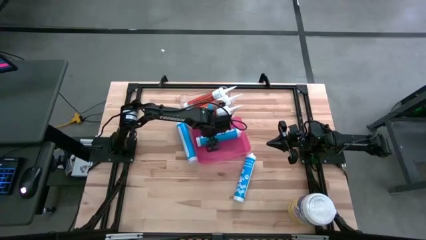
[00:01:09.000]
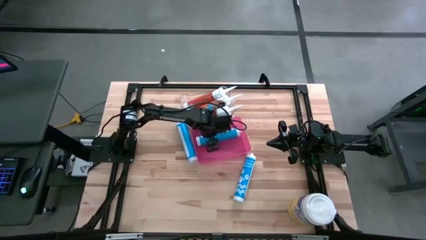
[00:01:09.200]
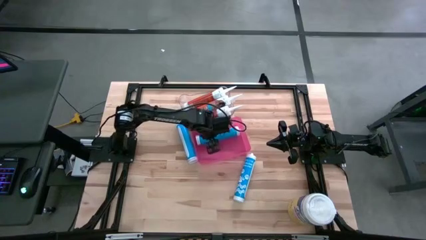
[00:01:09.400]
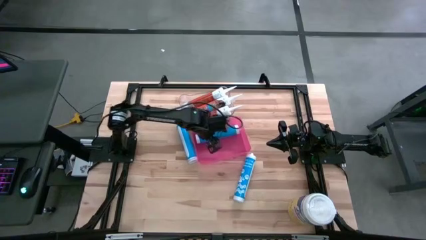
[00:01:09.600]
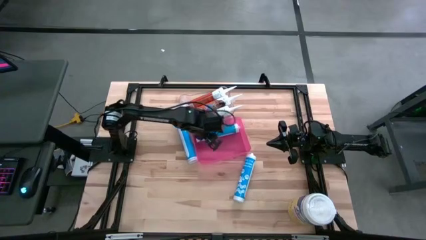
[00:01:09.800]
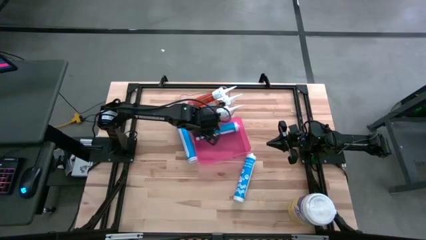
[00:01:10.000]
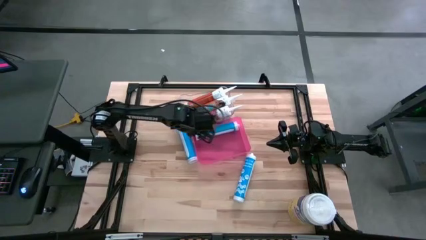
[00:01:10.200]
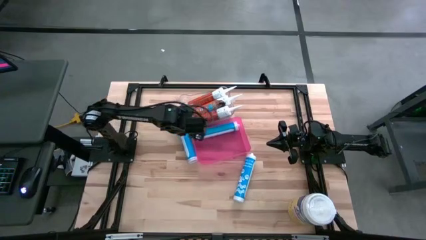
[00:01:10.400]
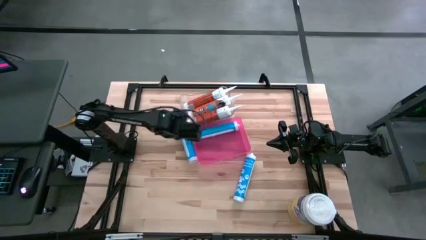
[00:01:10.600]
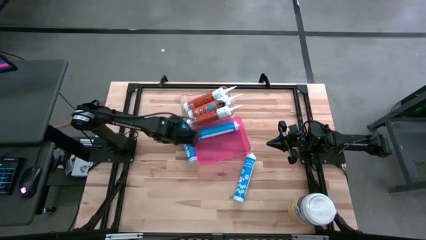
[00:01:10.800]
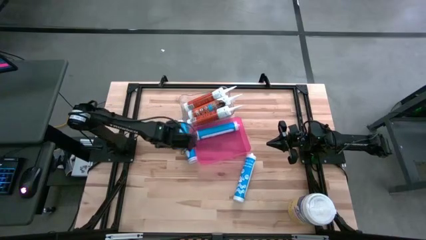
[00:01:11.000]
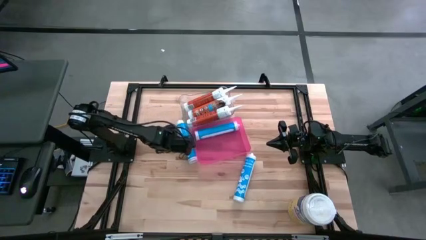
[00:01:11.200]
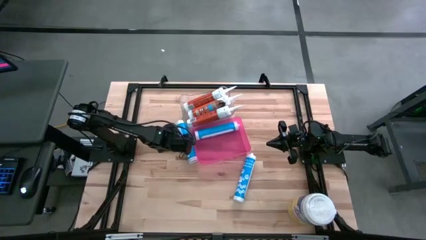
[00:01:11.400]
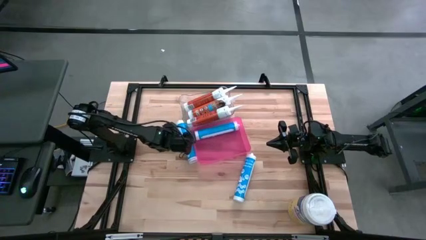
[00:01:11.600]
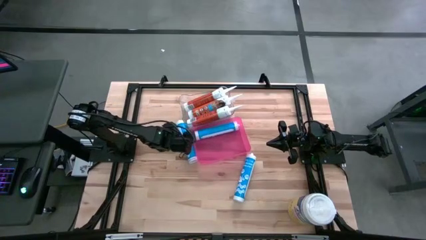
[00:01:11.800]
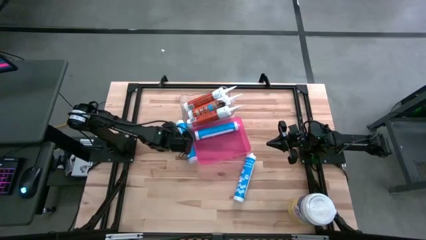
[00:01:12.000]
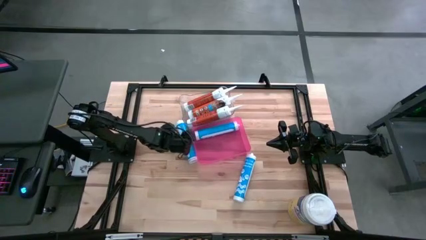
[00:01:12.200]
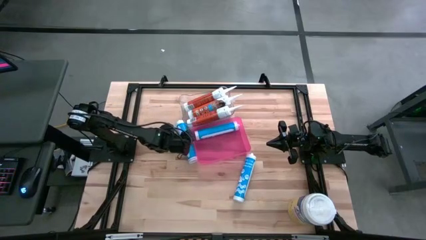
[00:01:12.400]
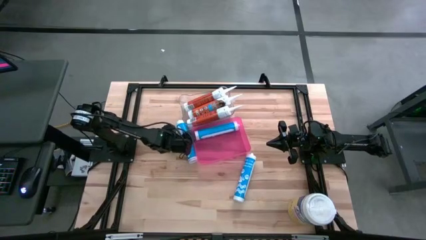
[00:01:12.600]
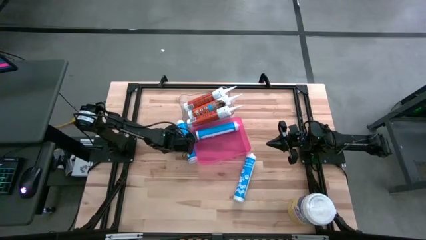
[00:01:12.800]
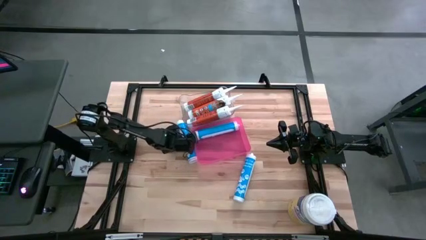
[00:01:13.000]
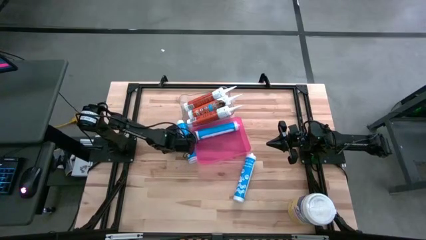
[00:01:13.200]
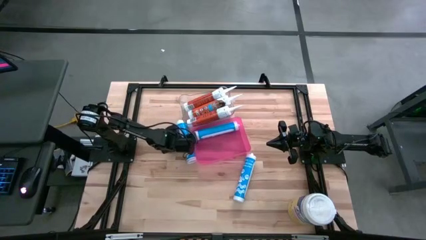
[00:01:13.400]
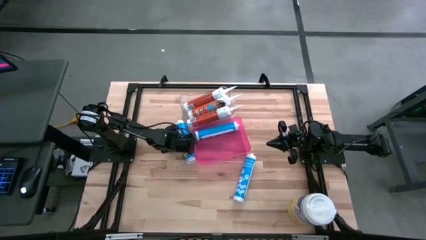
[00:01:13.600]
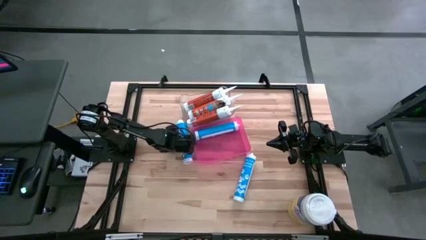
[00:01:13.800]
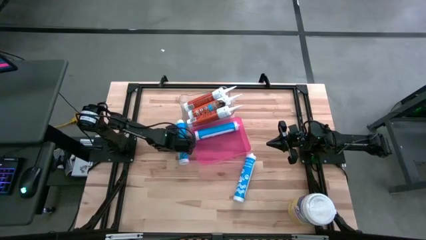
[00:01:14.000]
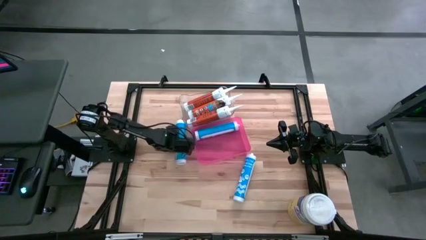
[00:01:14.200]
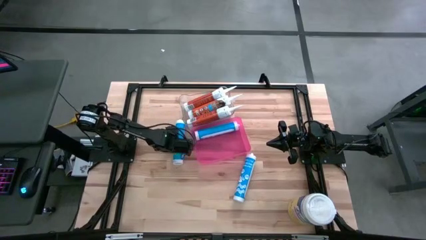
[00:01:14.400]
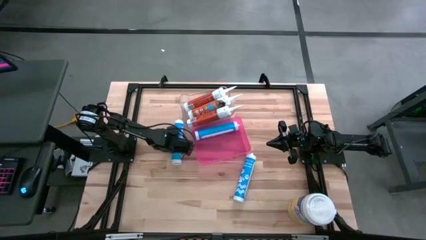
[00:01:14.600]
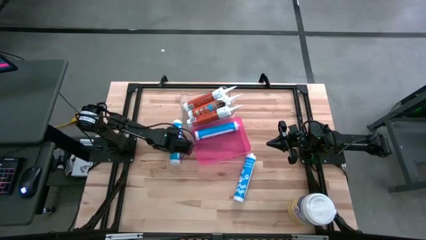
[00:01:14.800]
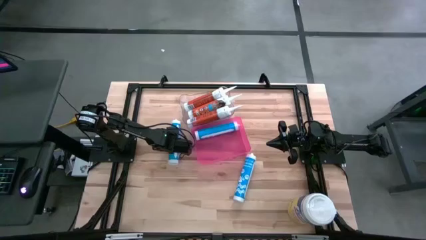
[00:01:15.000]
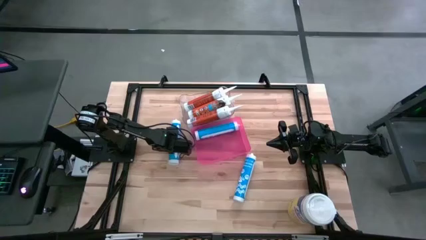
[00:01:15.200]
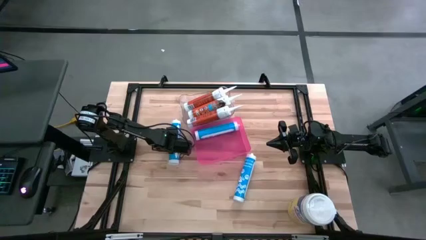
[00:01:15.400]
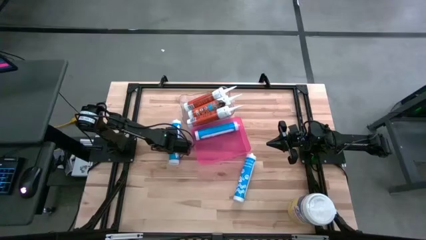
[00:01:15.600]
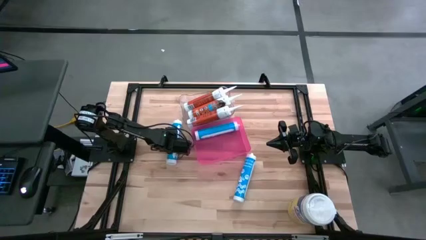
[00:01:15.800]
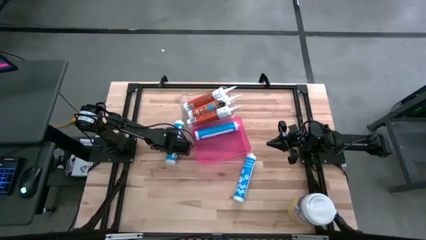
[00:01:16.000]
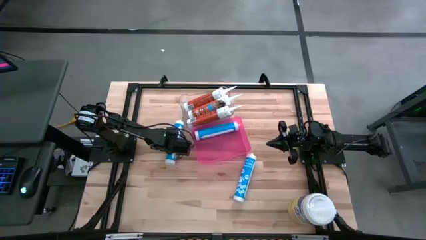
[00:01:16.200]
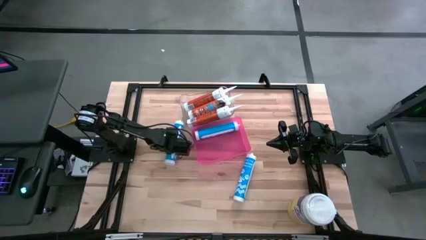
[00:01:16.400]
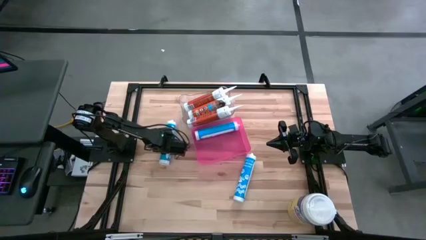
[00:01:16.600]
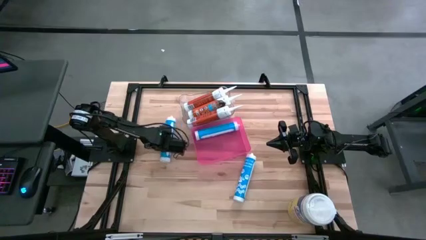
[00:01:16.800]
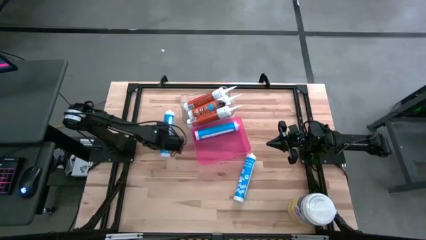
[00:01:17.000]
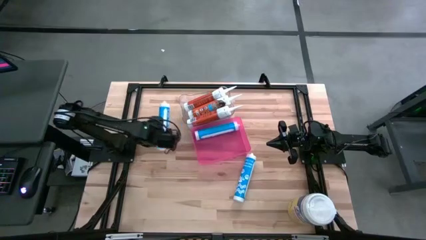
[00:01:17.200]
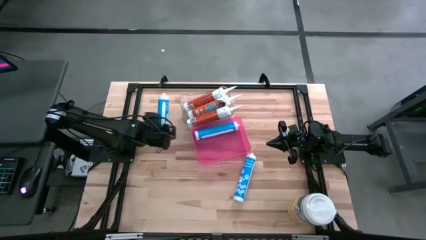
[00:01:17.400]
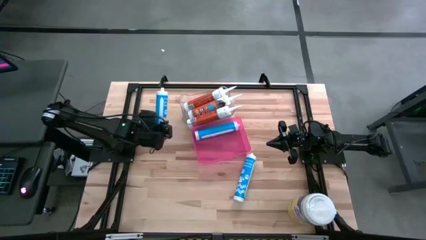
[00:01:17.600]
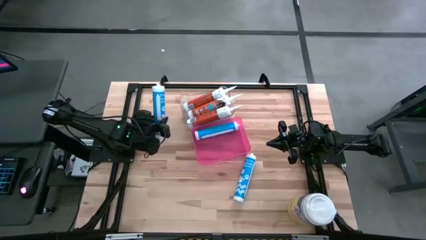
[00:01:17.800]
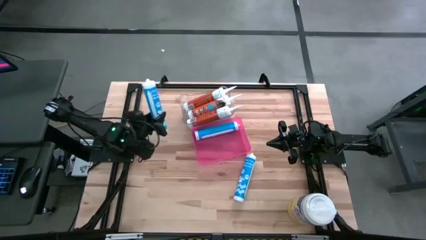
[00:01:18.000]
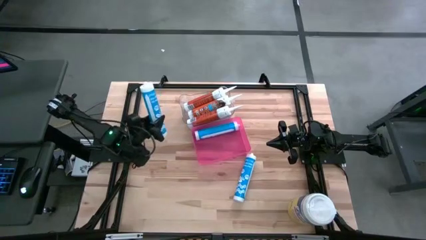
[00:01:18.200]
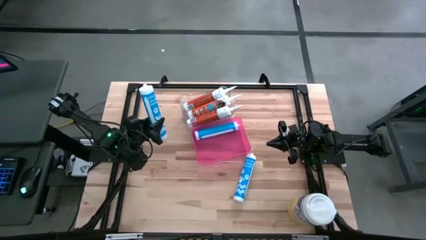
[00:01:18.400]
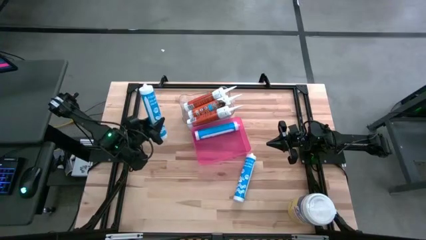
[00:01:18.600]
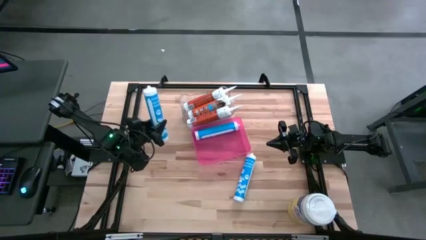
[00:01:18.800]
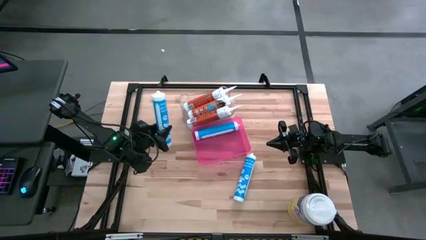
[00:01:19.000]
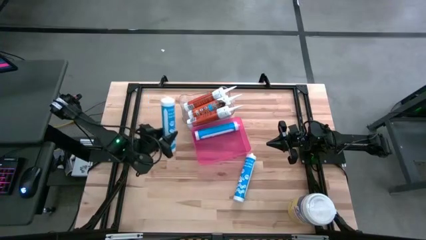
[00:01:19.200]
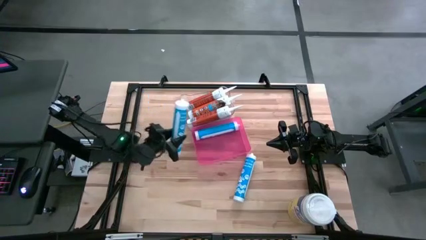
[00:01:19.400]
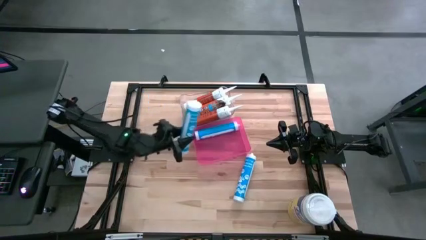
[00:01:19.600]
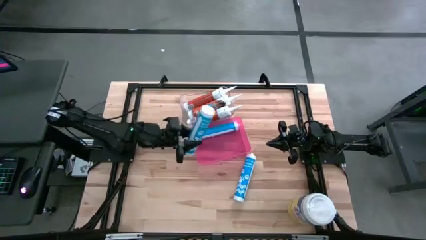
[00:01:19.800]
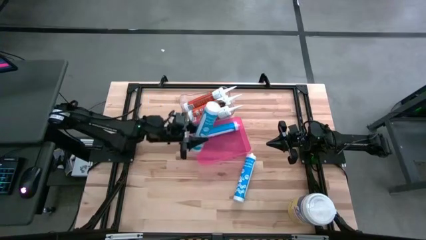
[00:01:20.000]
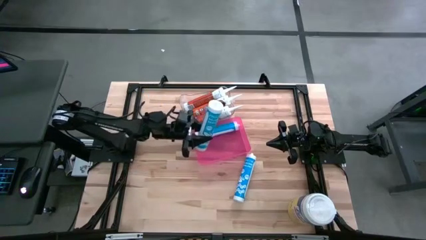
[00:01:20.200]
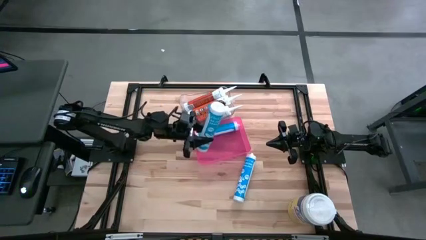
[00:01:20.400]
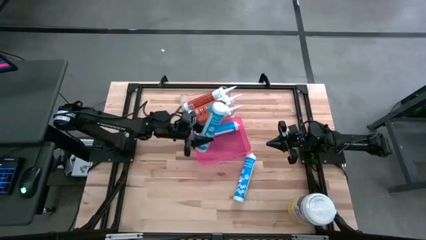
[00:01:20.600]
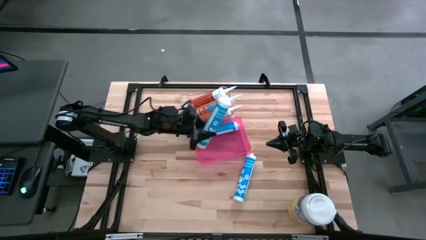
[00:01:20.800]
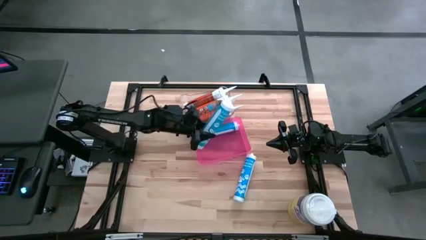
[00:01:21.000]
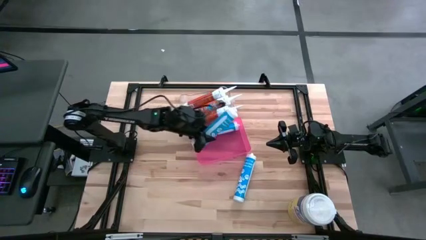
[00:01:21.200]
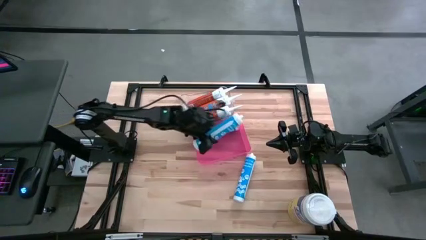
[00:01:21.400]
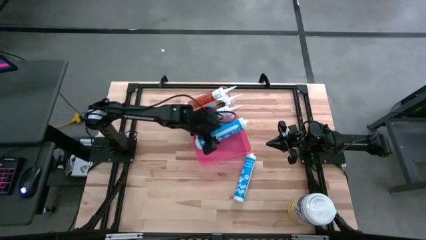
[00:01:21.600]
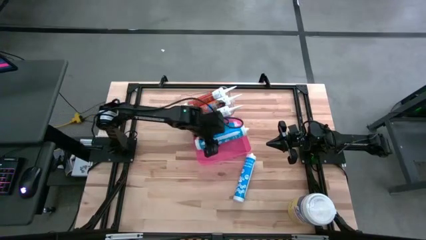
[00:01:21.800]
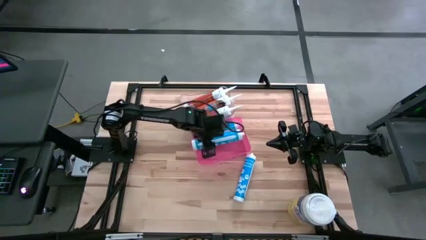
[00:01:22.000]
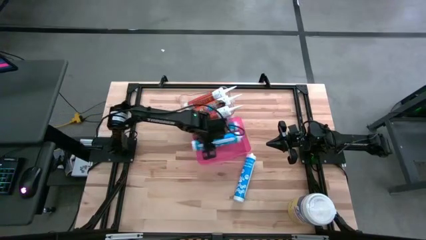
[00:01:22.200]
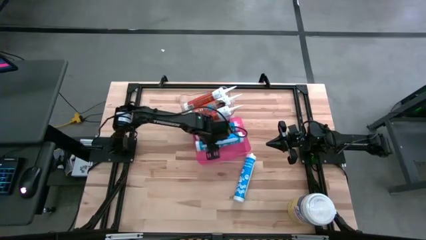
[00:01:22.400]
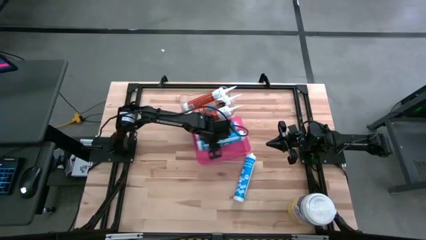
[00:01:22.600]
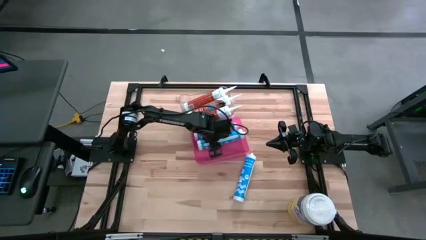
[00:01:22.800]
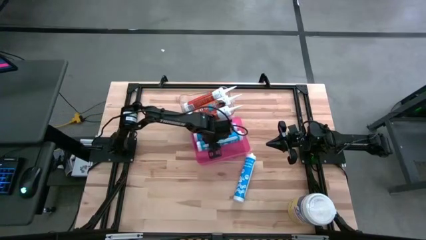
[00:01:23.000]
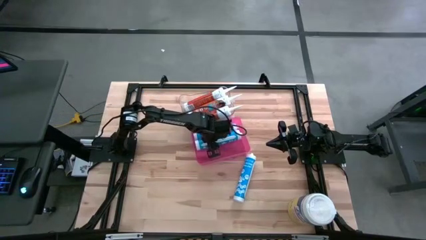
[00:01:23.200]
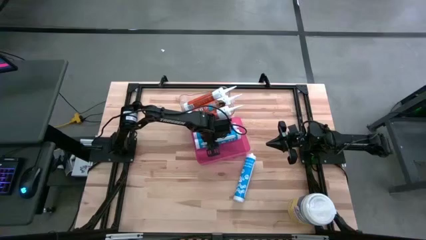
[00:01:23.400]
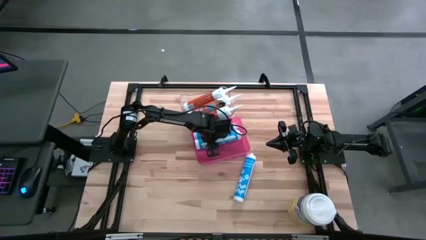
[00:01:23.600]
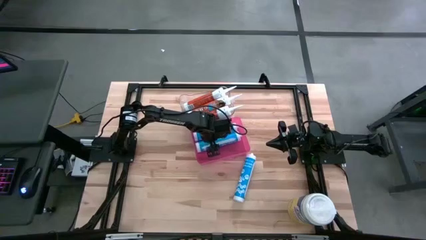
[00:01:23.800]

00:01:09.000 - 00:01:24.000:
Task: Pick & place silicon tubes, Sealant and Lysol wipes
Put the top blue sealant into the pink bin
